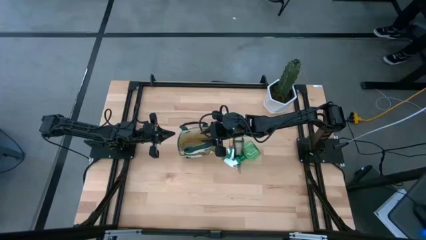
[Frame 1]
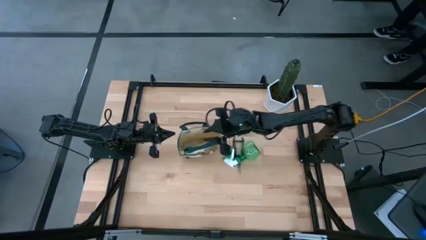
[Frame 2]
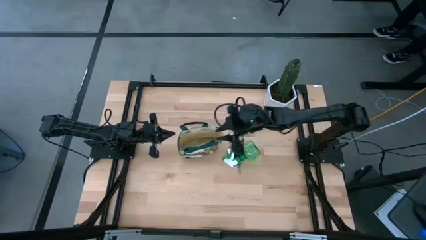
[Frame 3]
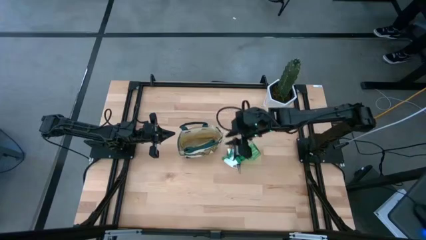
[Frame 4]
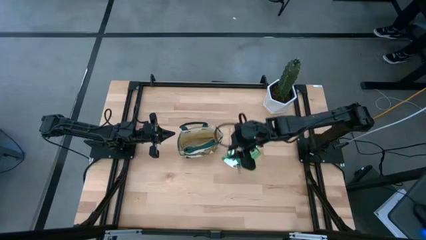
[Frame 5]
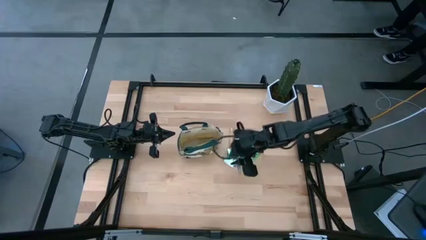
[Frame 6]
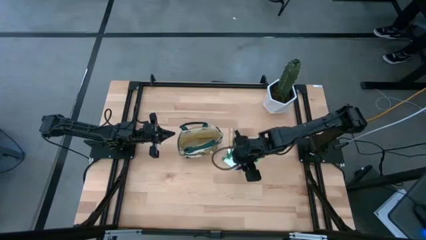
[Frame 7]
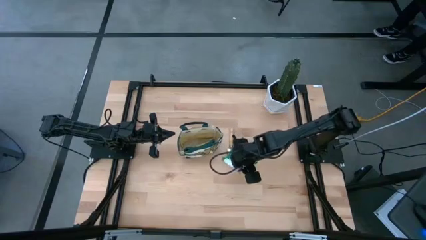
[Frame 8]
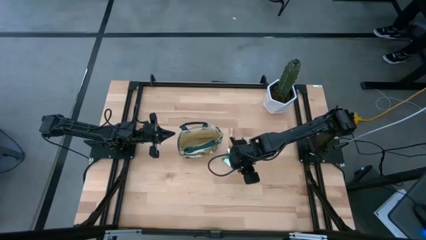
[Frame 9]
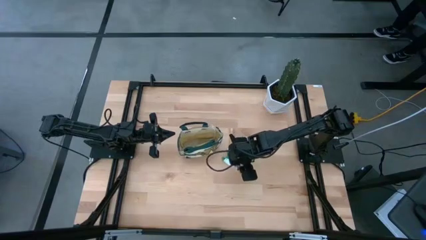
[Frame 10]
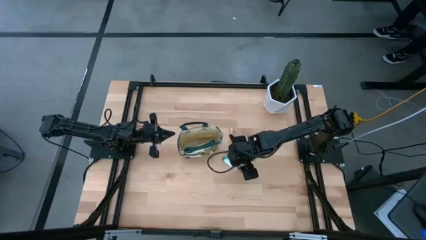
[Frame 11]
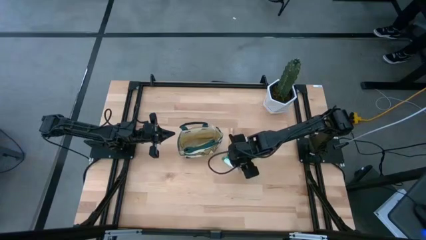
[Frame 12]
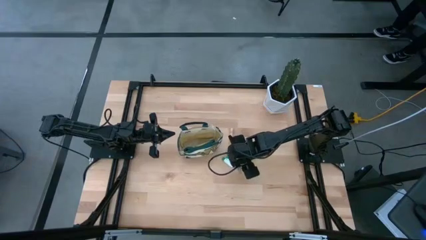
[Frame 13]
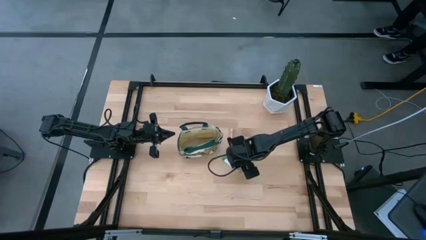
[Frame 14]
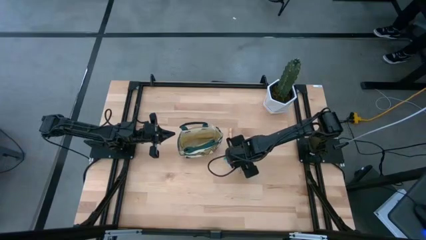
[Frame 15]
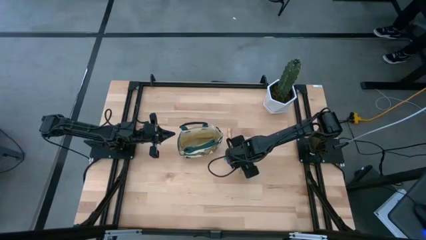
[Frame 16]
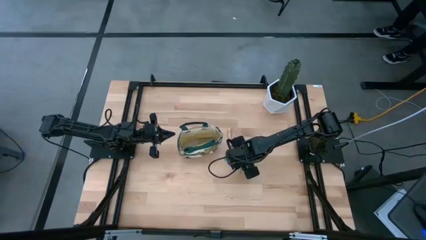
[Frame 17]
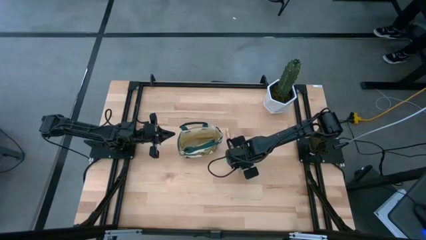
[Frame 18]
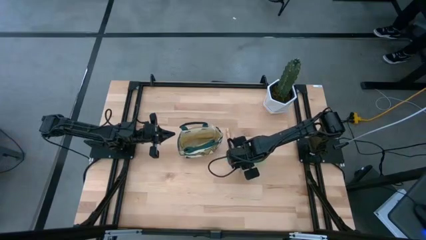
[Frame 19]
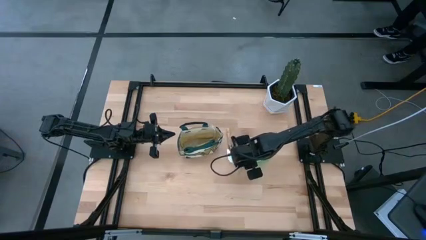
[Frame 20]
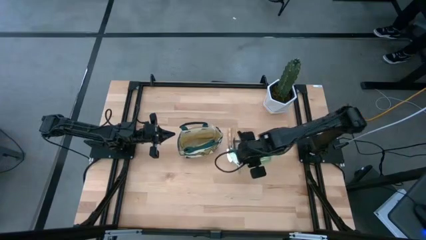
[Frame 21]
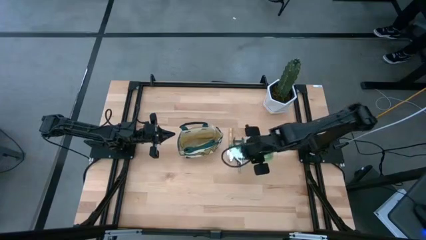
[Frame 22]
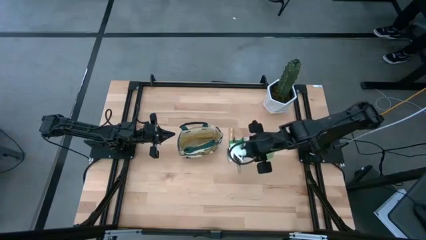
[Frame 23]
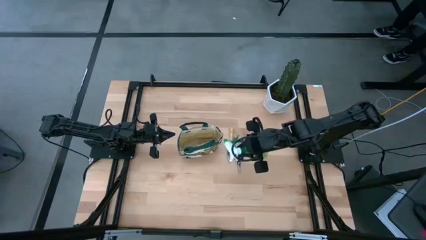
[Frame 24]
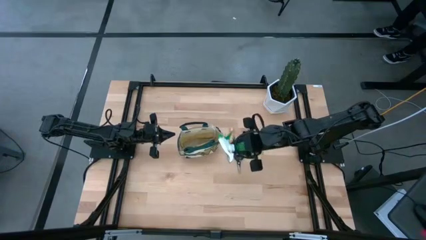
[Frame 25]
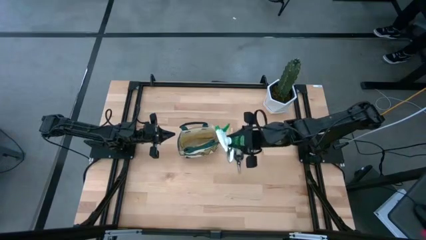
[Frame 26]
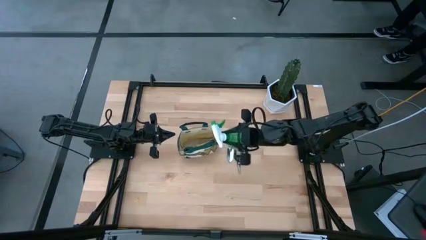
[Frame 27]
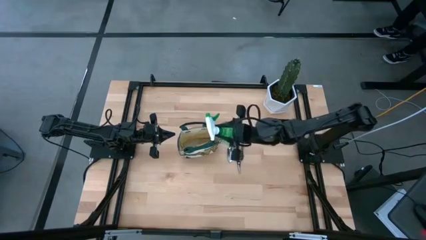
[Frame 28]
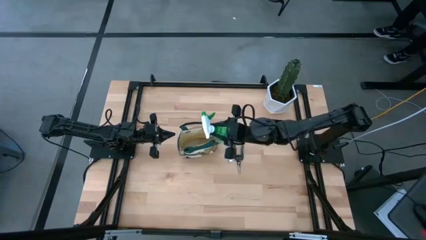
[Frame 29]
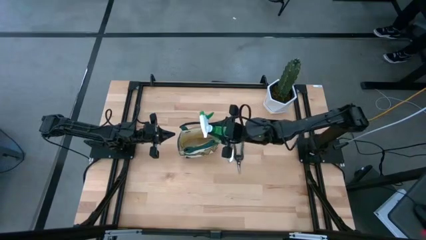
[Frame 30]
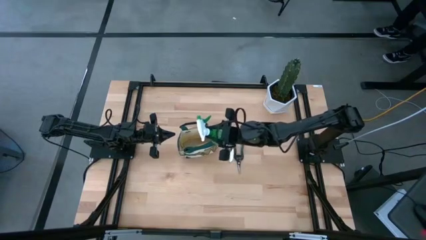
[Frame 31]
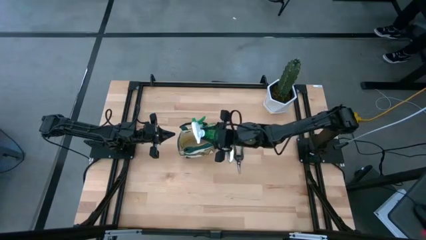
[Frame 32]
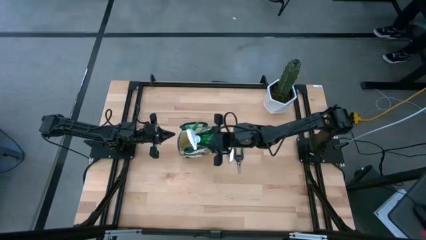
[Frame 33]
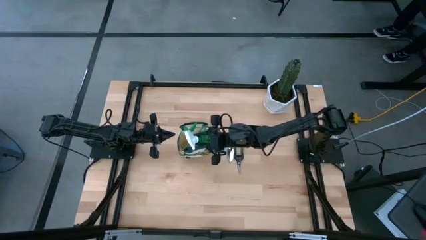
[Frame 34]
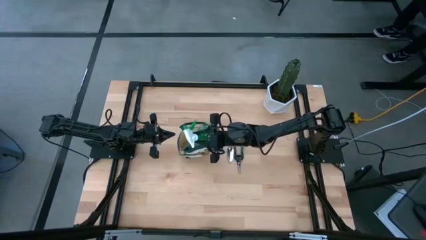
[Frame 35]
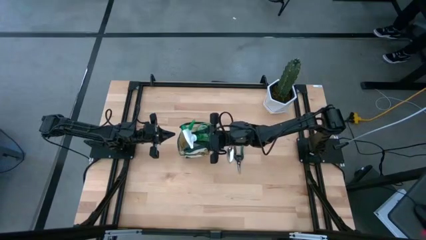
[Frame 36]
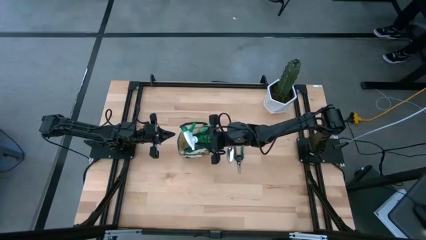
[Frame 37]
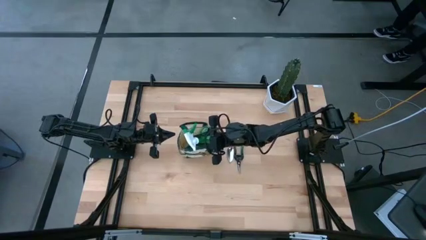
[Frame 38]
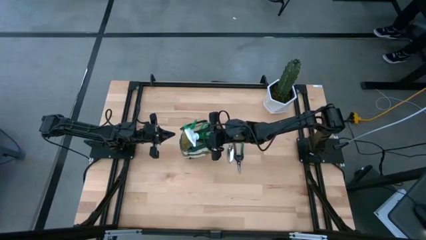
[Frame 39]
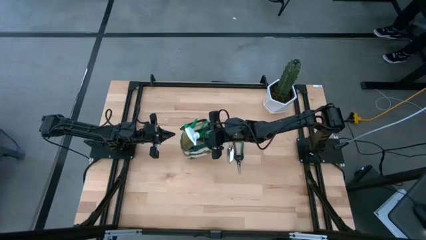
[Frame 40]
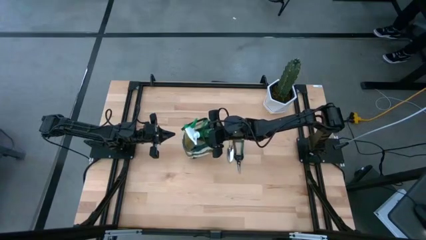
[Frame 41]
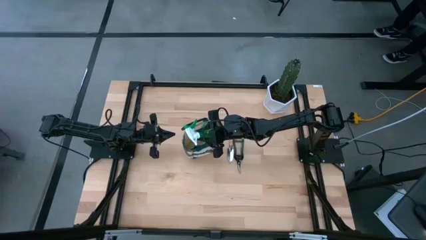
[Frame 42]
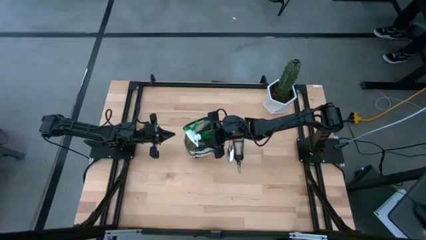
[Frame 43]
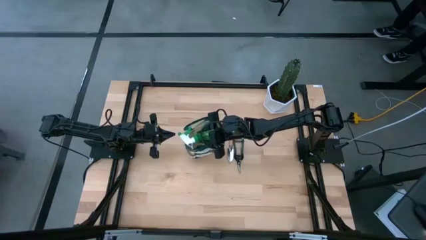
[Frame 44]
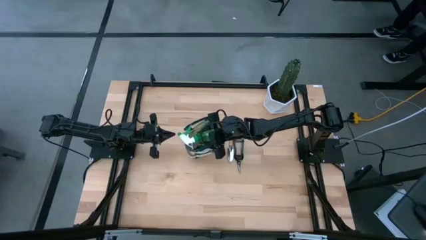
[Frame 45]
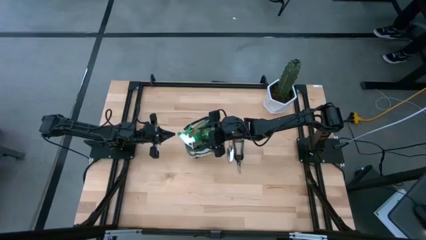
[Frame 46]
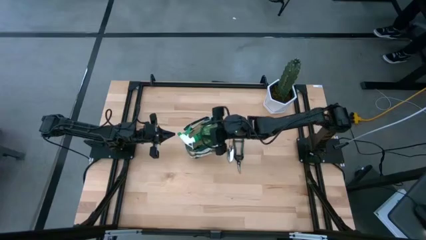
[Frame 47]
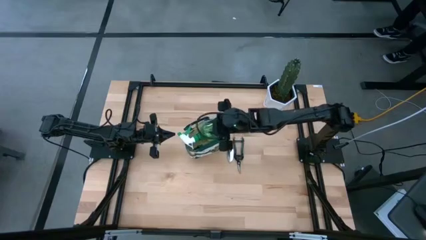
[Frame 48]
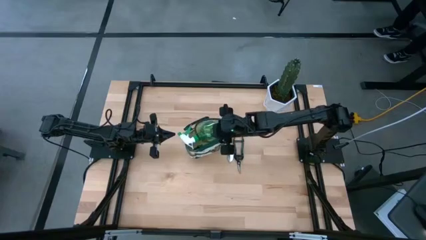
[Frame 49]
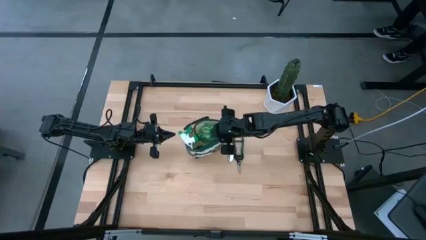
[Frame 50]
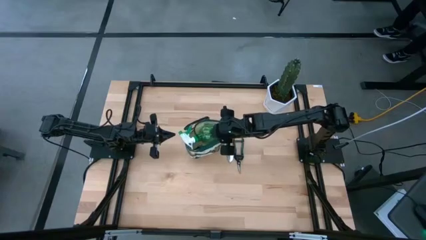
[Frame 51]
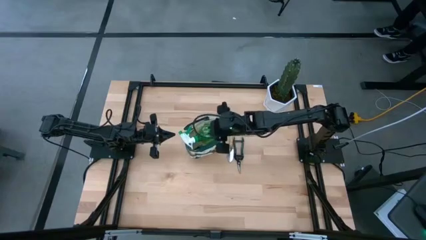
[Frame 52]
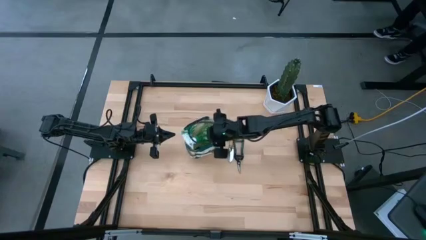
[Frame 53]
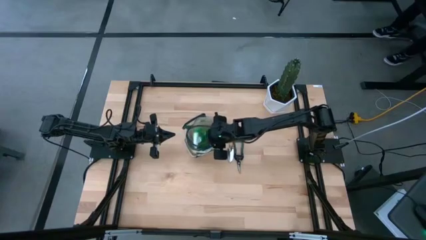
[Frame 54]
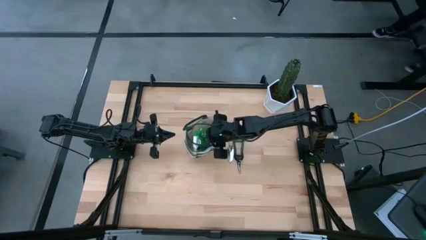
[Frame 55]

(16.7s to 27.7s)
Task: Pick & Place Garden tools in Gardening bag
Put the green spray bottle into the gardening bag
